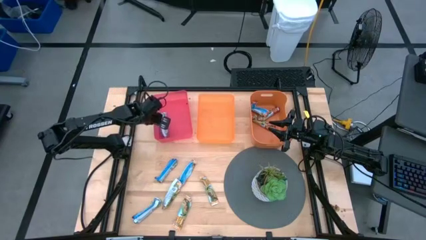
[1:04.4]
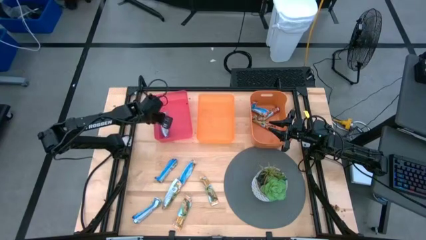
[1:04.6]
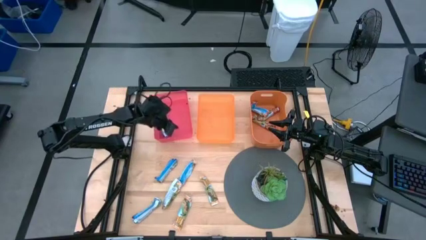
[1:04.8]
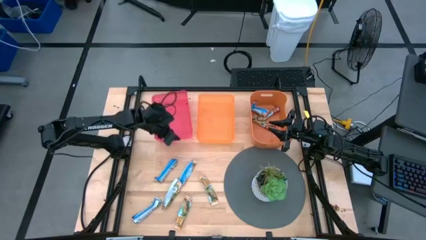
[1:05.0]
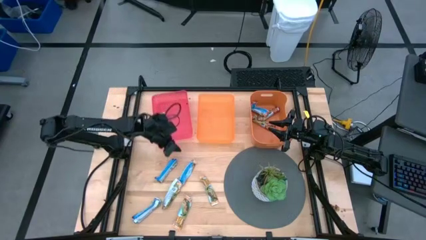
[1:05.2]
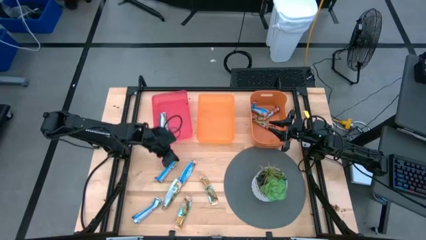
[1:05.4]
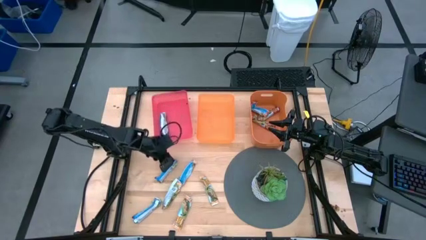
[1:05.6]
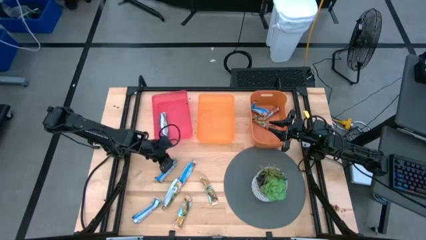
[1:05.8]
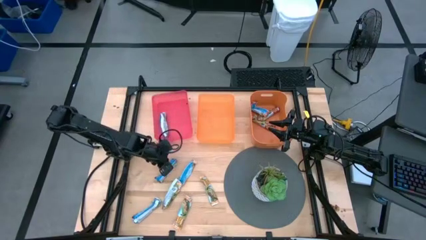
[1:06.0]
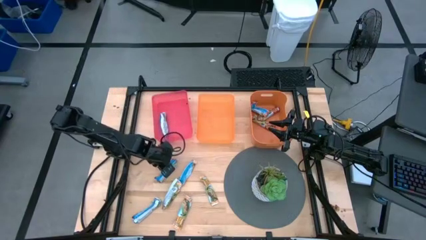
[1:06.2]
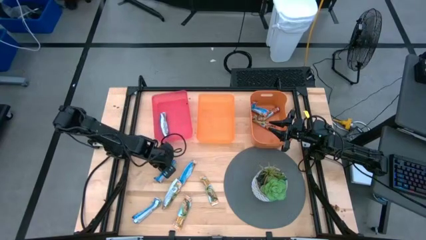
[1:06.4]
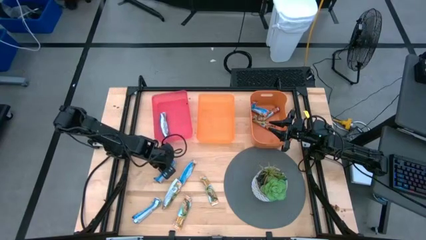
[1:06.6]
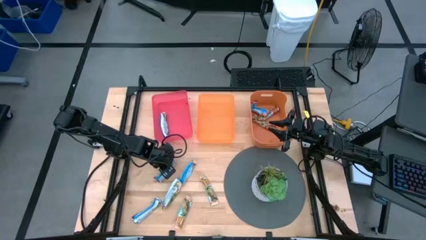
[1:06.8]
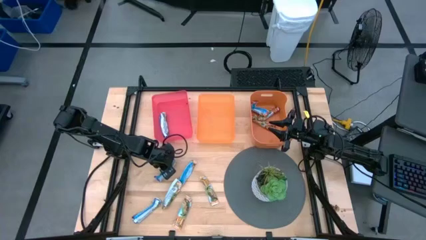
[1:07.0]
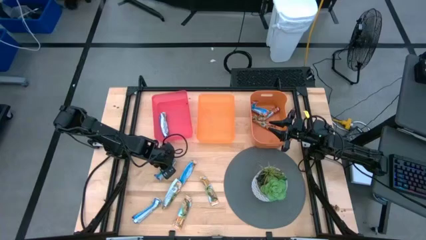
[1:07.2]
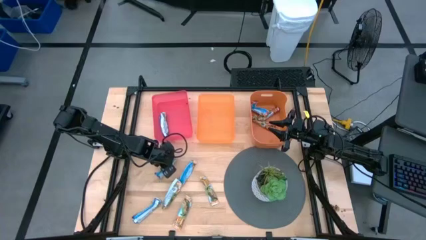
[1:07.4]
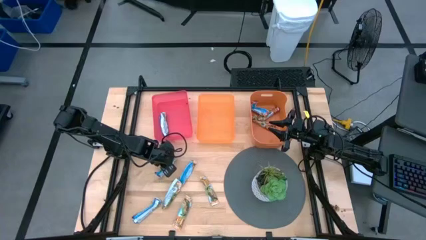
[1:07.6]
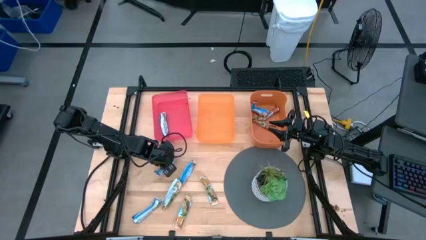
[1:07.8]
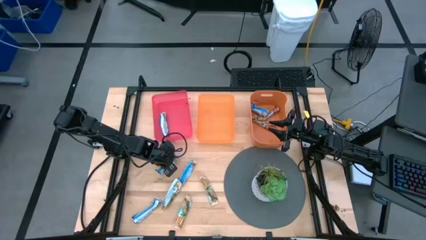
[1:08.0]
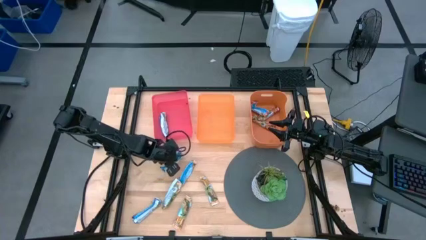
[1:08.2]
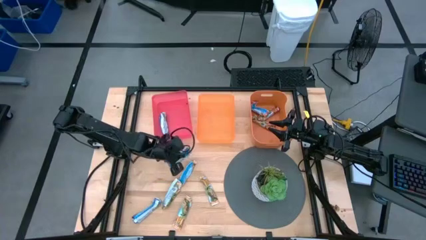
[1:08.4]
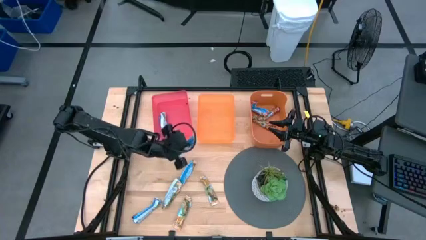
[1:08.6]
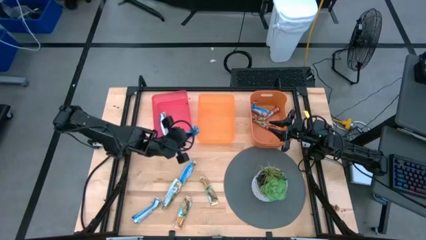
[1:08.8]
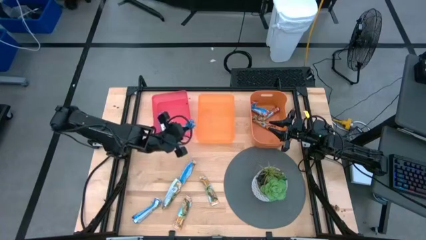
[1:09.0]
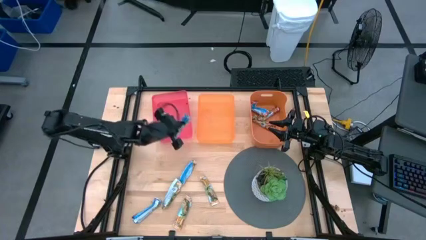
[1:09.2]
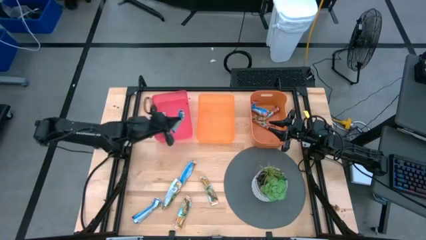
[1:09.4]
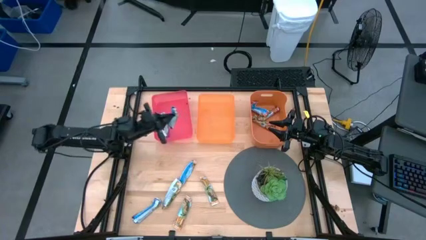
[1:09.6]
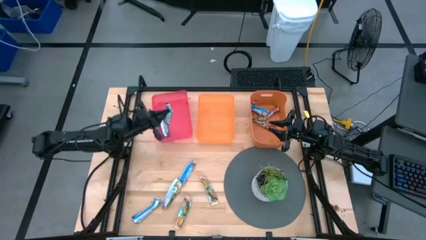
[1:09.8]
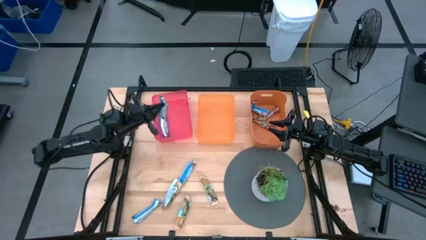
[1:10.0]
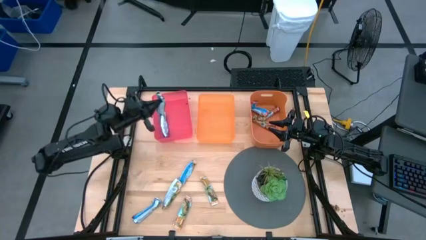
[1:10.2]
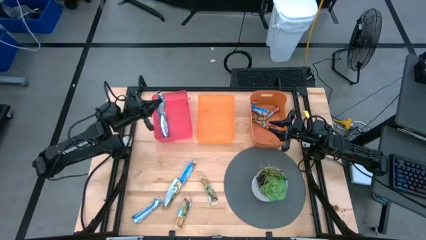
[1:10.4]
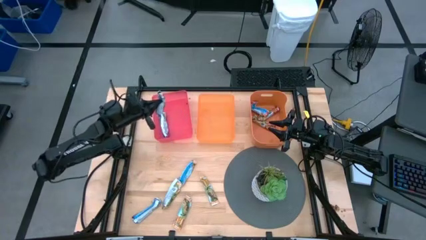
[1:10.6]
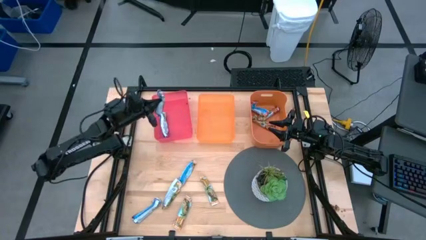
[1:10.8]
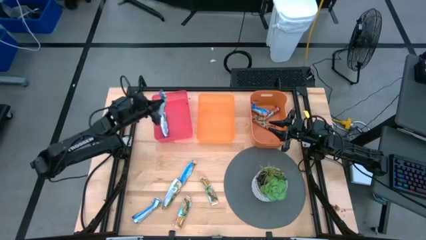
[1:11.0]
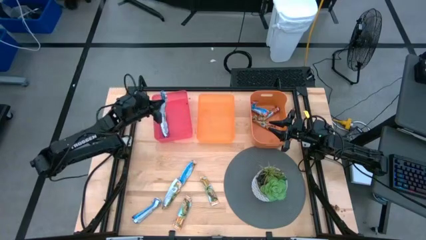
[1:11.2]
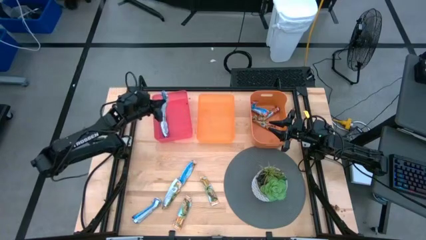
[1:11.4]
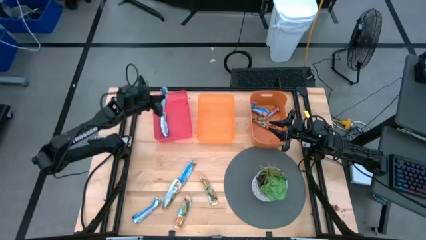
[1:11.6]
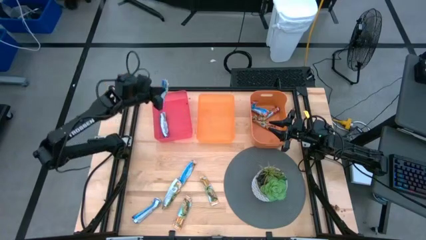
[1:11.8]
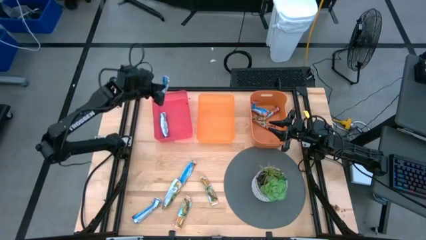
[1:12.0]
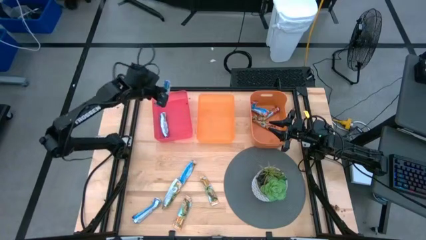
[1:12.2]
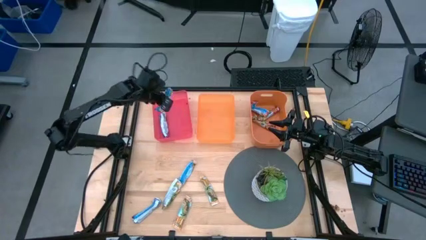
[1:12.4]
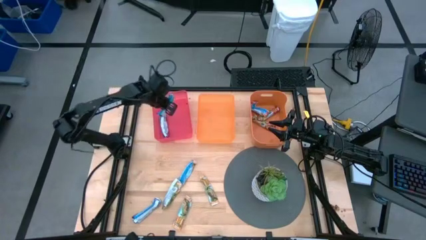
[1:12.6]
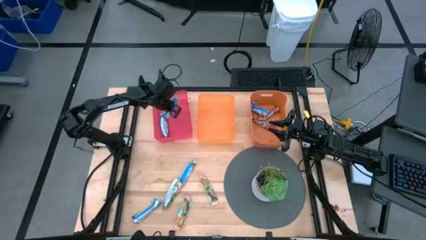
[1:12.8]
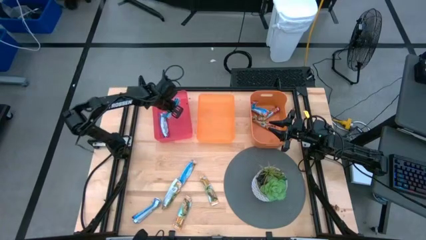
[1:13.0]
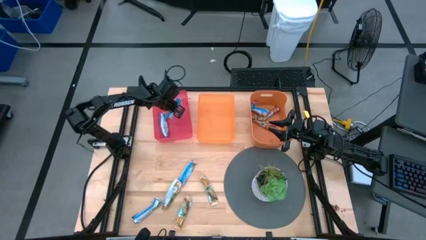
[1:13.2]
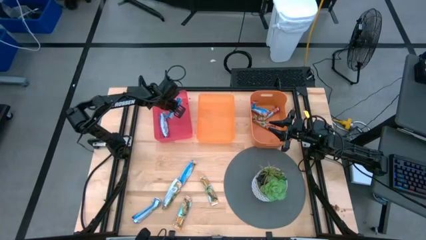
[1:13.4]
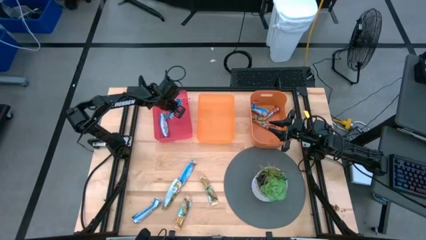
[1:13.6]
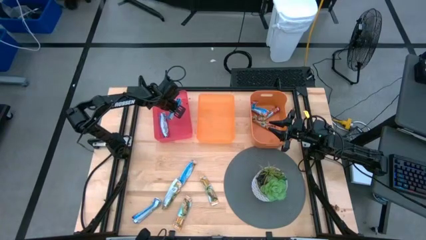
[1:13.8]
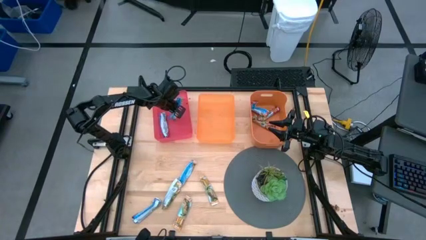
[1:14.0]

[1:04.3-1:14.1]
Task: Pick and place Granola Bars by type
Put the top blue granola bar into the pink bin

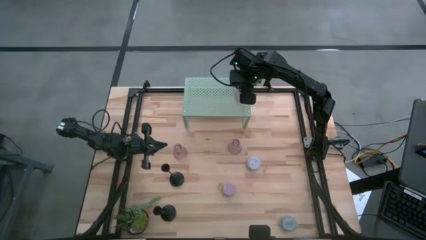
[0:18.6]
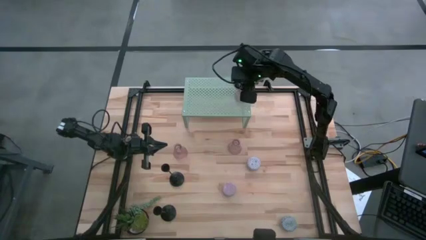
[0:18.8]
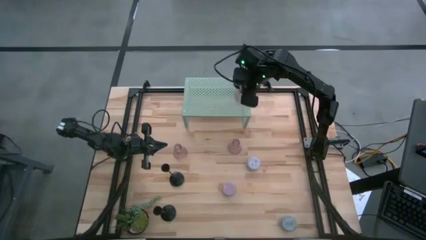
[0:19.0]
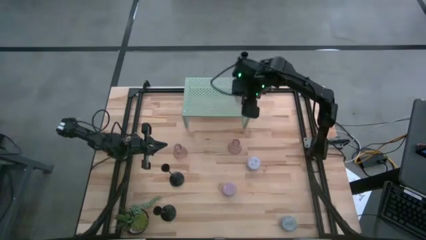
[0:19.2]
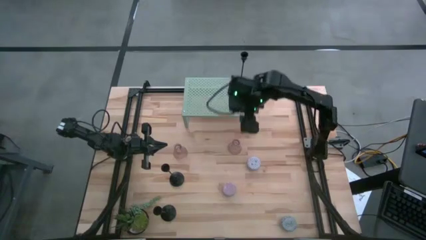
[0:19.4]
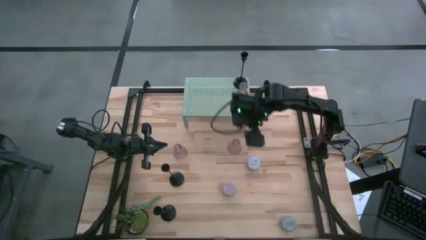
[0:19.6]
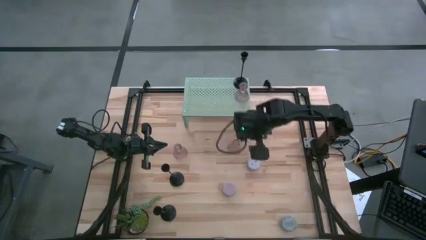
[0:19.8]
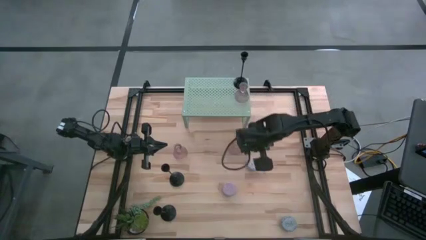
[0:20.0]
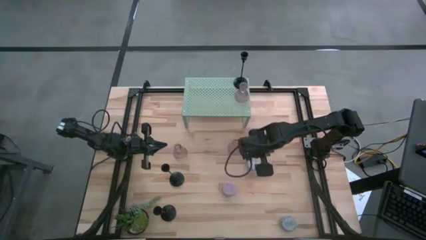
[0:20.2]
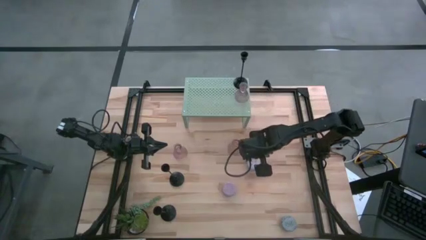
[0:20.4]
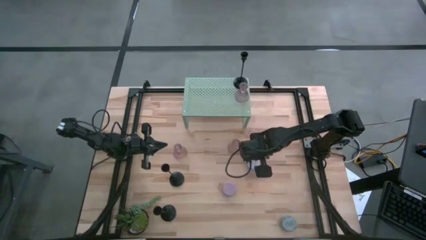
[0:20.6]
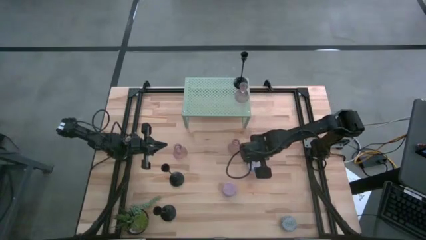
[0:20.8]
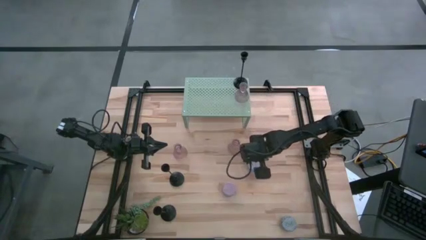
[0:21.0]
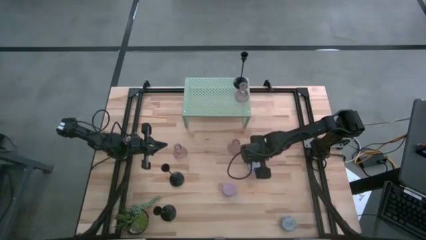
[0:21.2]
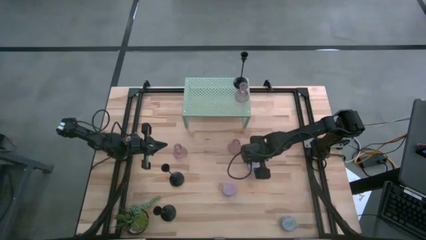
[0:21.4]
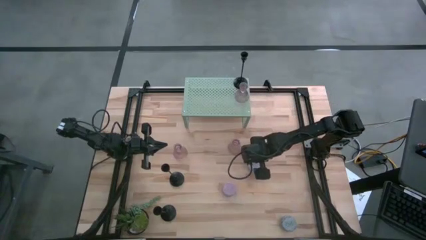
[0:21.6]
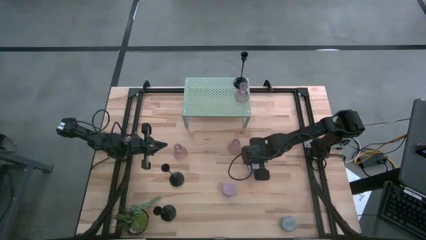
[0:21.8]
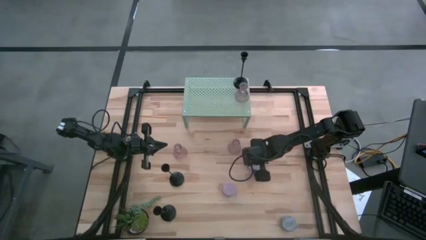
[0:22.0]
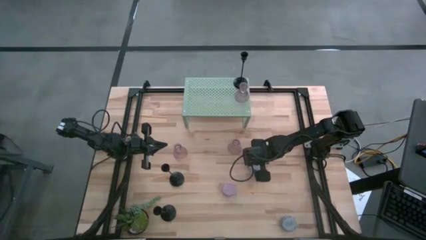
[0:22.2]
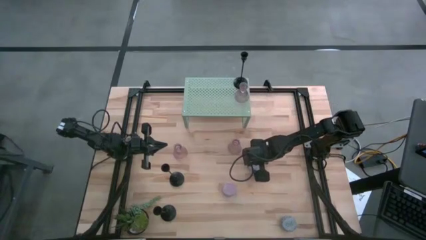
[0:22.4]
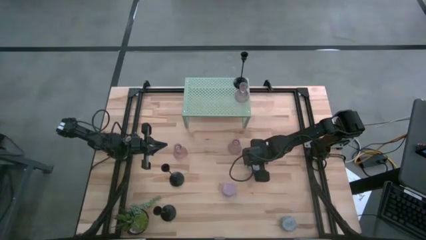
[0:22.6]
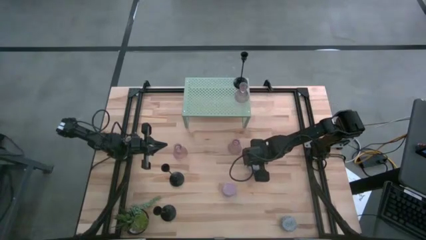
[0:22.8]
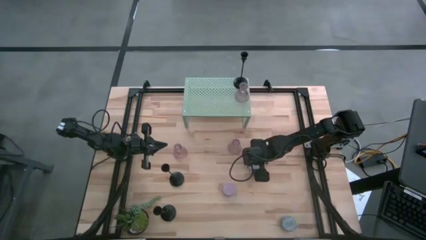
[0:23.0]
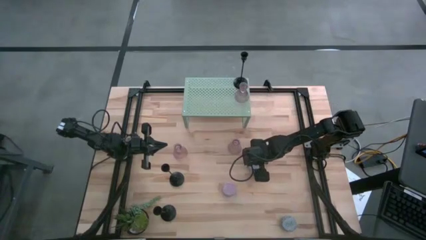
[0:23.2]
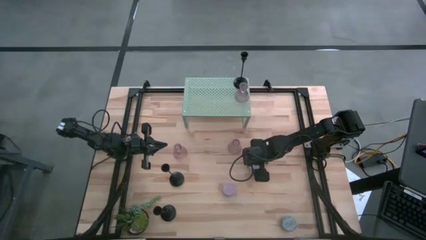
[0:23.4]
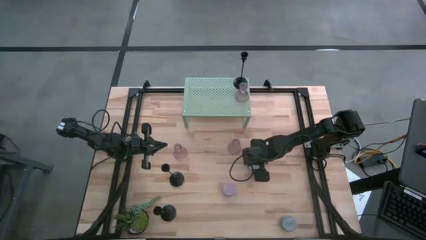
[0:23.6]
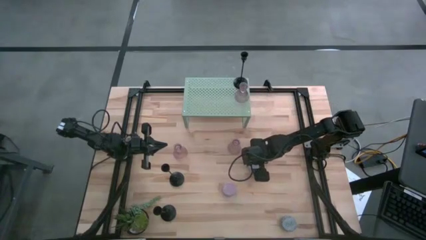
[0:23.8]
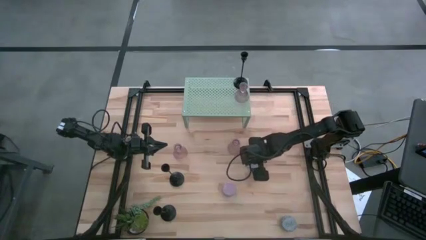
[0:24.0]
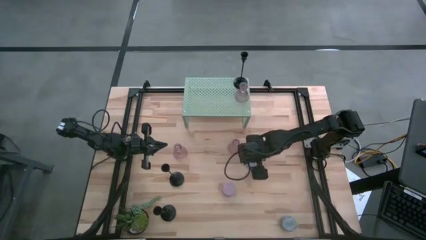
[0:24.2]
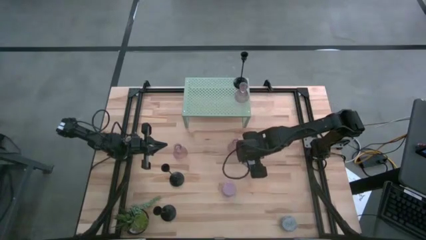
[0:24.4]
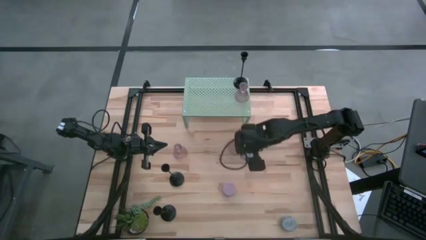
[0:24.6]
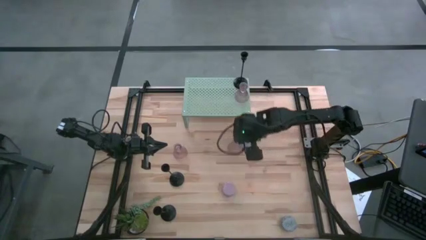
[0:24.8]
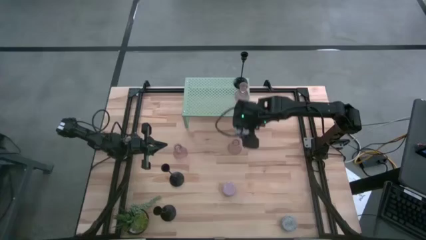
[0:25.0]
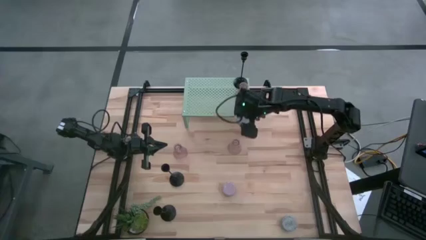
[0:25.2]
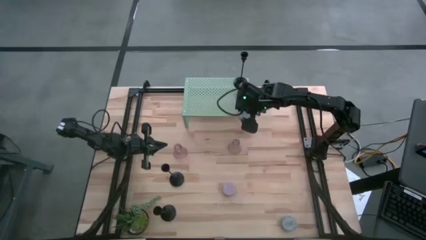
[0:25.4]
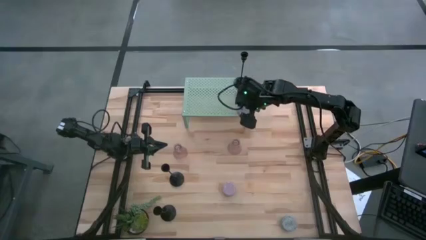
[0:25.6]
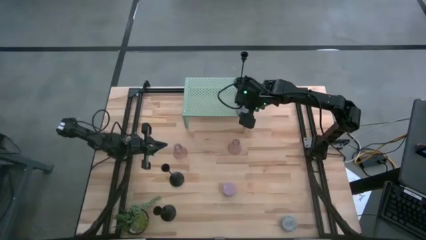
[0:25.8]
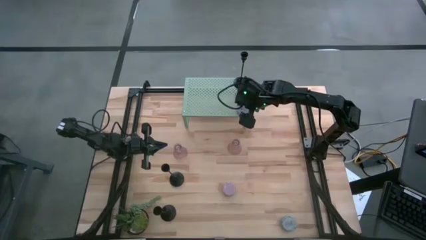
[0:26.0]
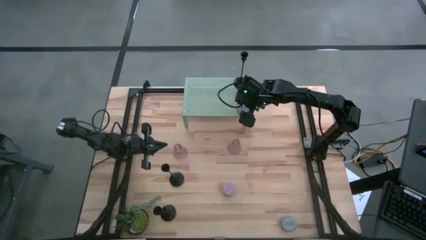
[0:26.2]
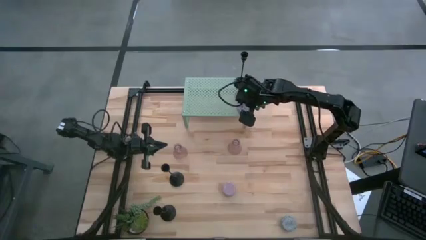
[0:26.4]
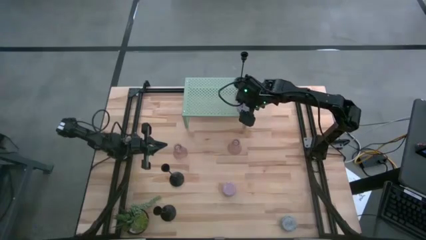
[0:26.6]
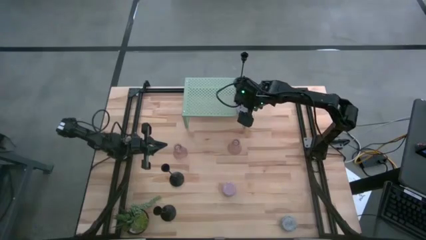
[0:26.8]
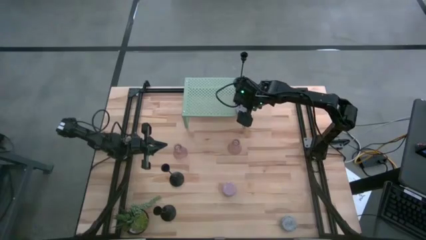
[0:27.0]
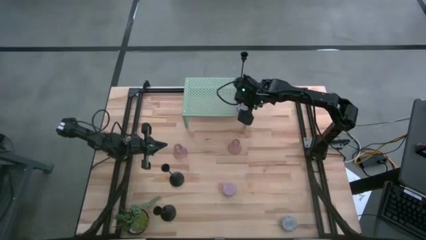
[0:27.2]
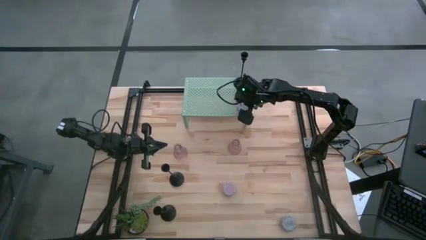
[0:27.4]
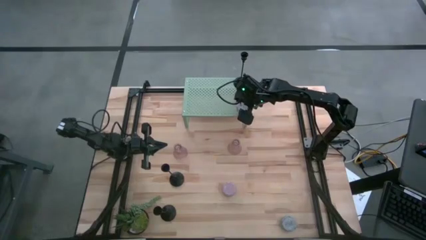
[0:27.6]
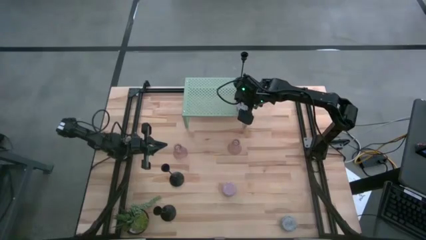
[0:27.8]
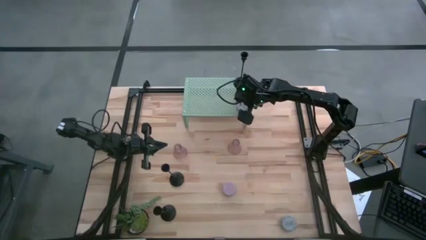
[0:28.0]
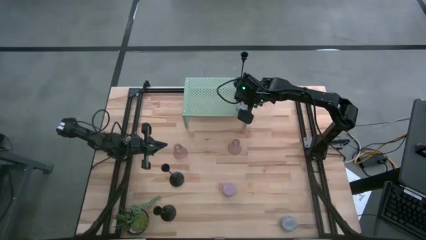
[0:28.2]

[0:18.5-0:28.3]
Task: Pick & Place candle stick holders
Put the red scented candle on the shelf
